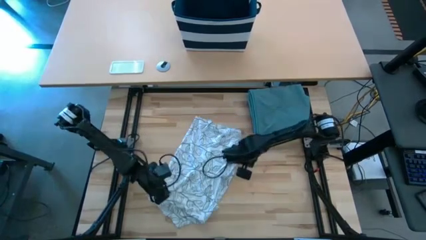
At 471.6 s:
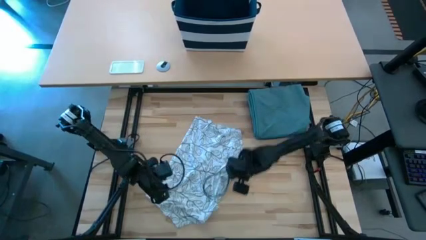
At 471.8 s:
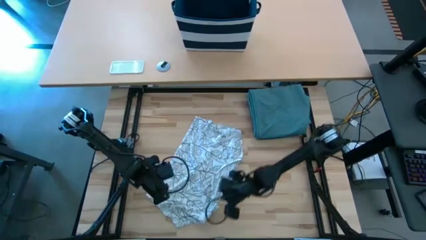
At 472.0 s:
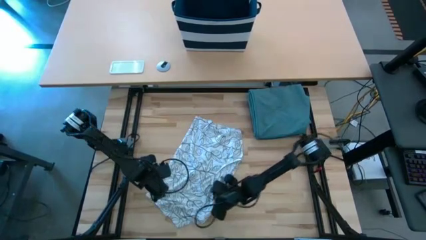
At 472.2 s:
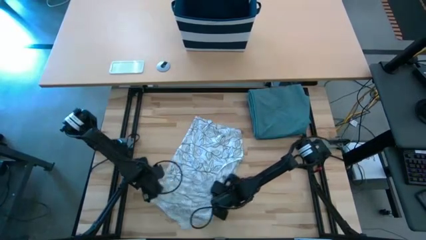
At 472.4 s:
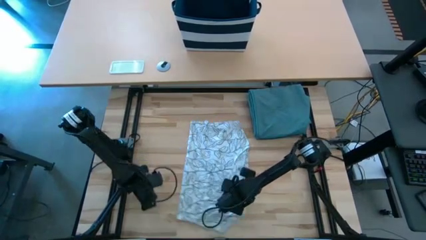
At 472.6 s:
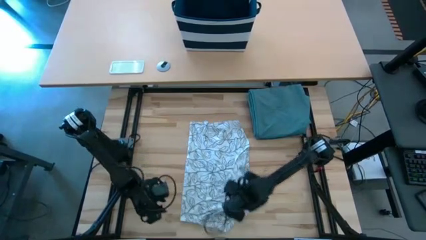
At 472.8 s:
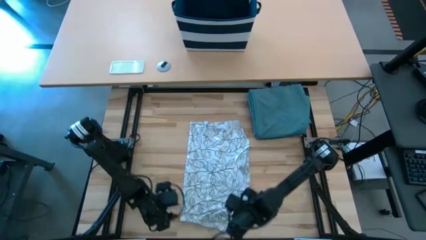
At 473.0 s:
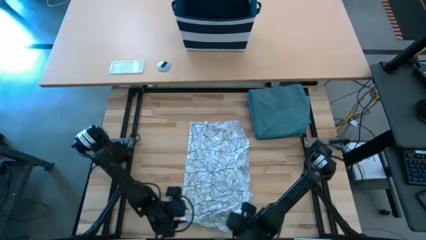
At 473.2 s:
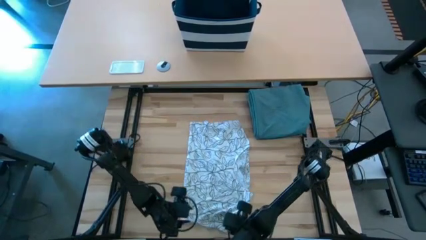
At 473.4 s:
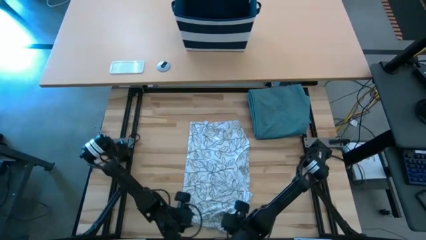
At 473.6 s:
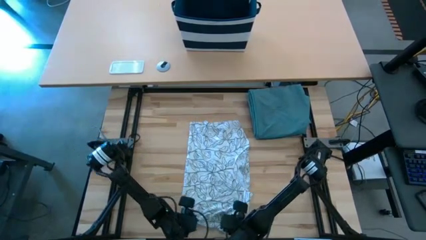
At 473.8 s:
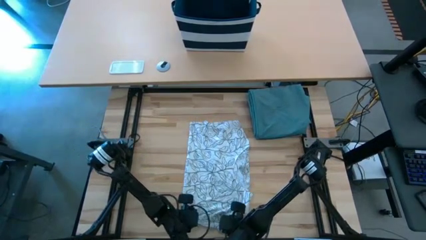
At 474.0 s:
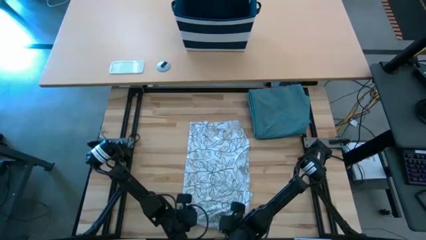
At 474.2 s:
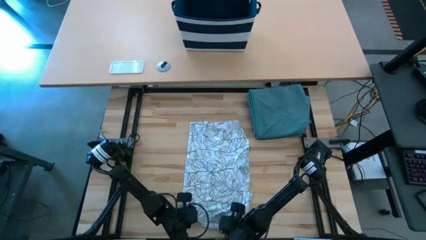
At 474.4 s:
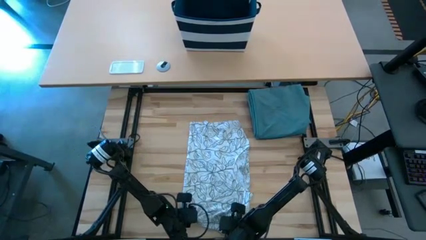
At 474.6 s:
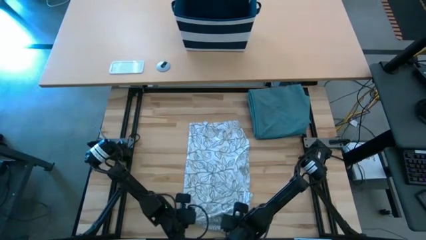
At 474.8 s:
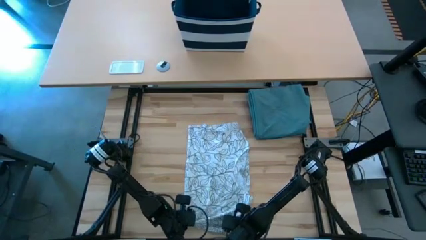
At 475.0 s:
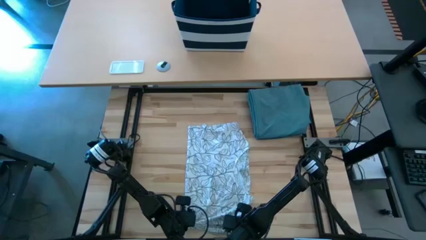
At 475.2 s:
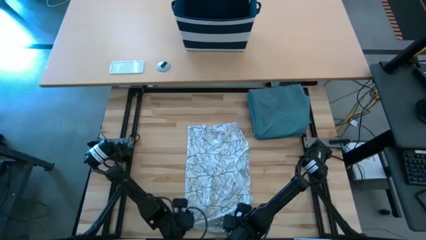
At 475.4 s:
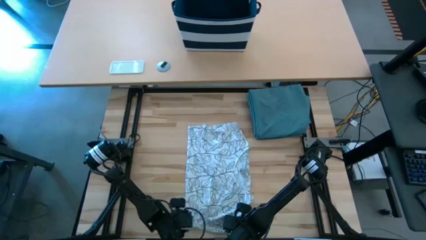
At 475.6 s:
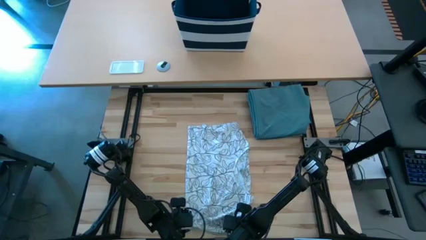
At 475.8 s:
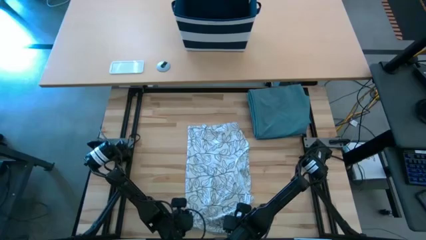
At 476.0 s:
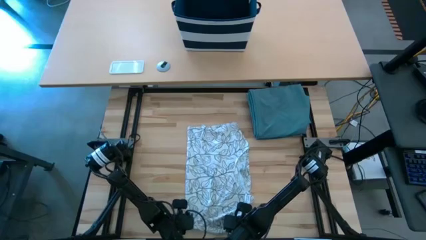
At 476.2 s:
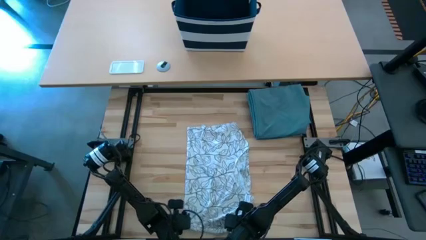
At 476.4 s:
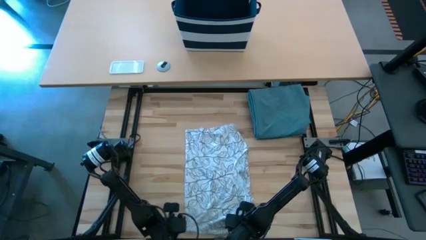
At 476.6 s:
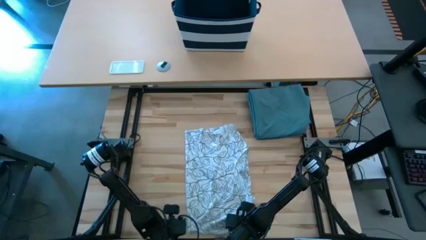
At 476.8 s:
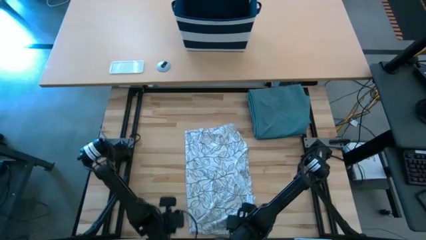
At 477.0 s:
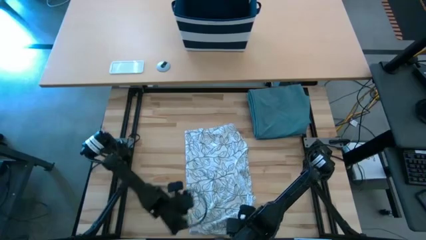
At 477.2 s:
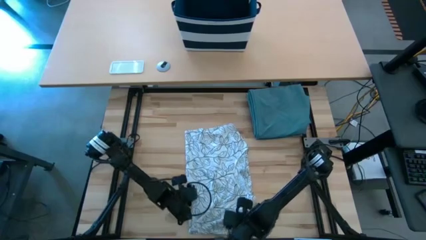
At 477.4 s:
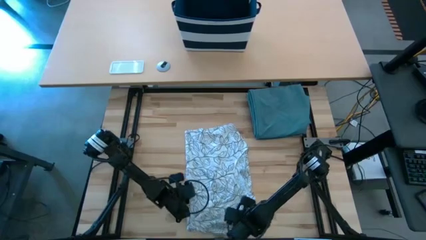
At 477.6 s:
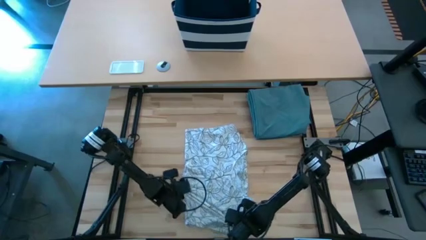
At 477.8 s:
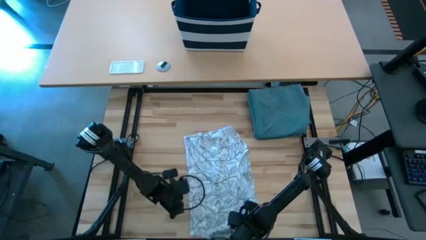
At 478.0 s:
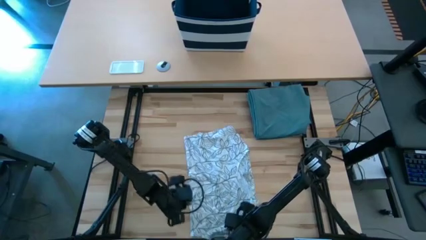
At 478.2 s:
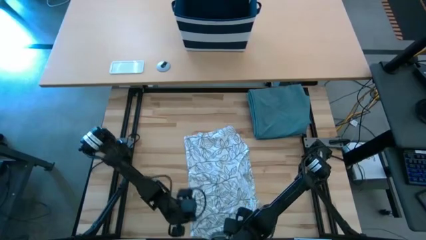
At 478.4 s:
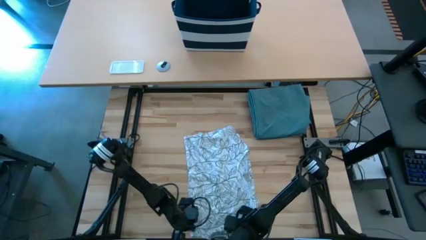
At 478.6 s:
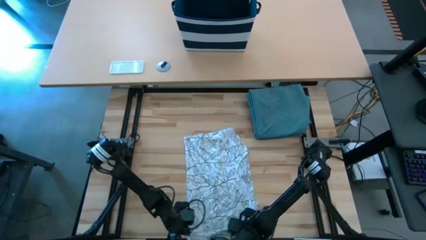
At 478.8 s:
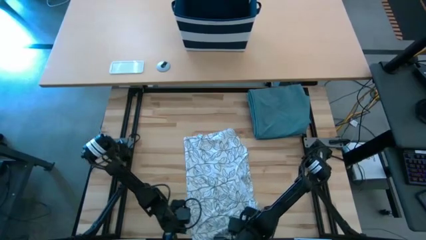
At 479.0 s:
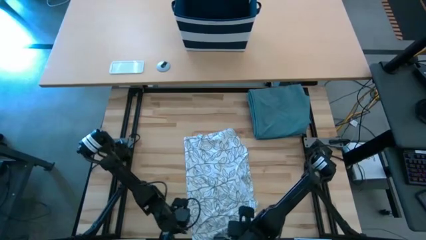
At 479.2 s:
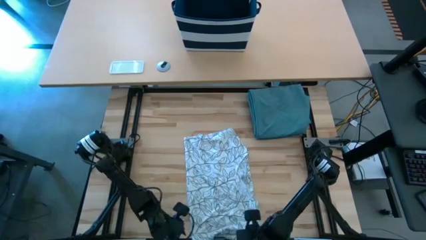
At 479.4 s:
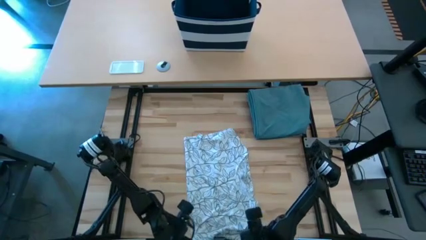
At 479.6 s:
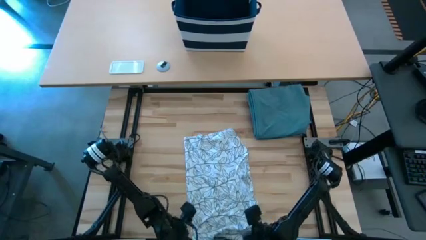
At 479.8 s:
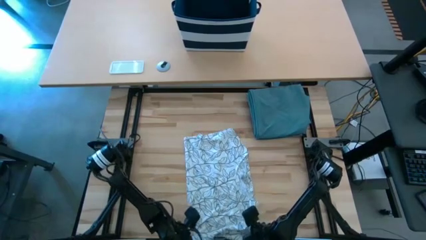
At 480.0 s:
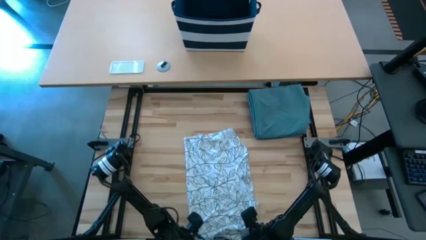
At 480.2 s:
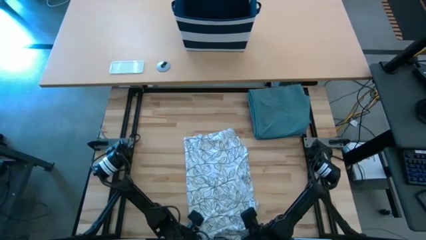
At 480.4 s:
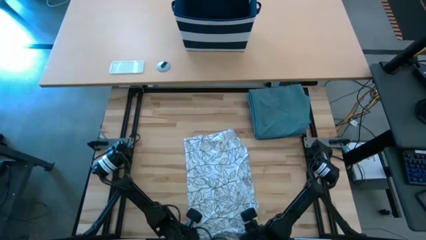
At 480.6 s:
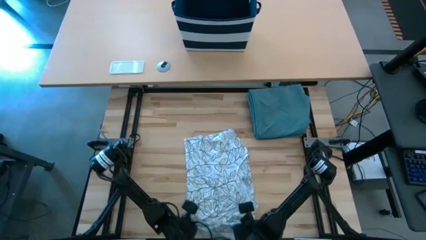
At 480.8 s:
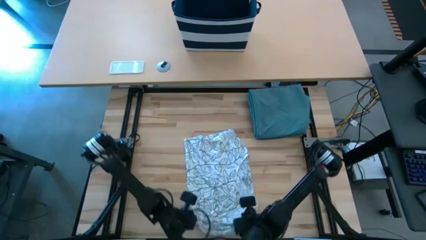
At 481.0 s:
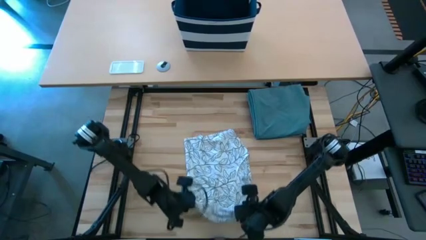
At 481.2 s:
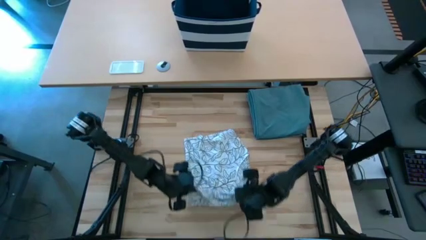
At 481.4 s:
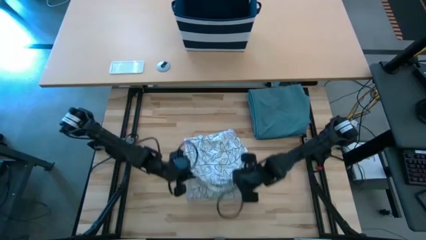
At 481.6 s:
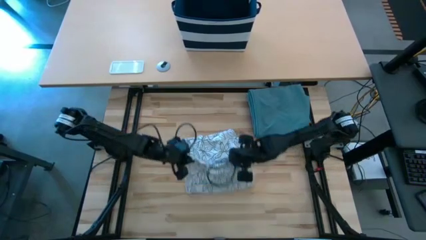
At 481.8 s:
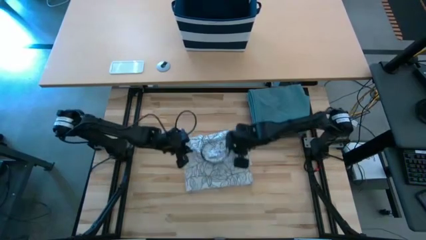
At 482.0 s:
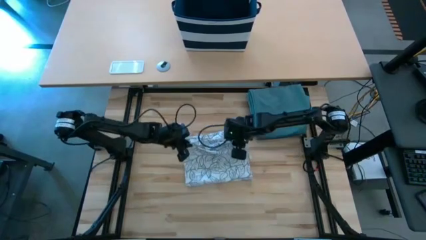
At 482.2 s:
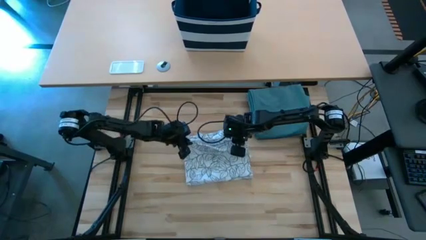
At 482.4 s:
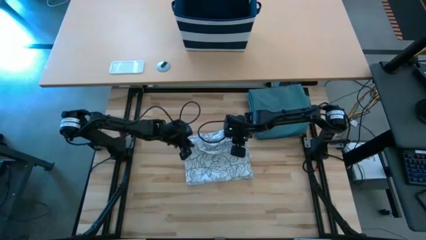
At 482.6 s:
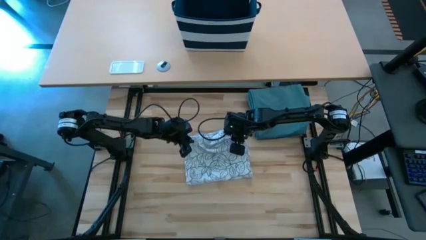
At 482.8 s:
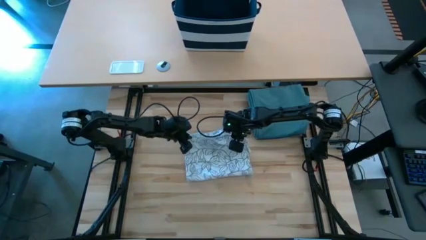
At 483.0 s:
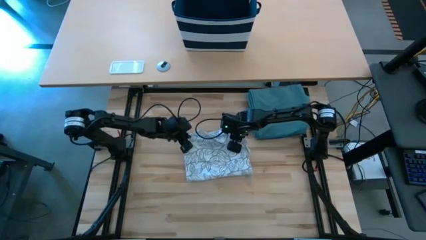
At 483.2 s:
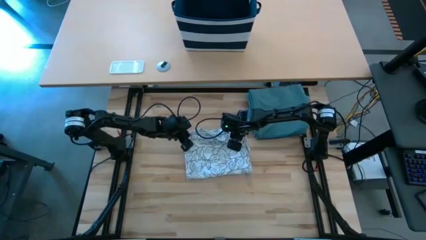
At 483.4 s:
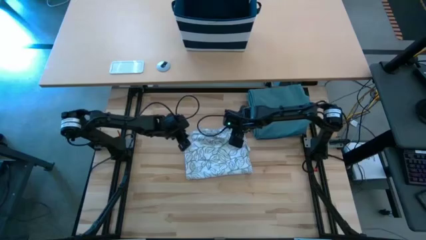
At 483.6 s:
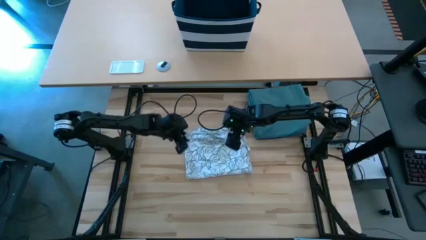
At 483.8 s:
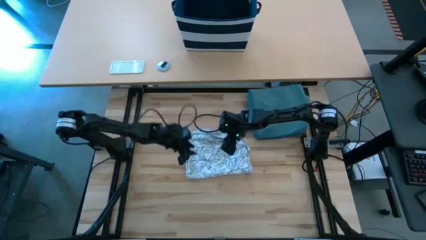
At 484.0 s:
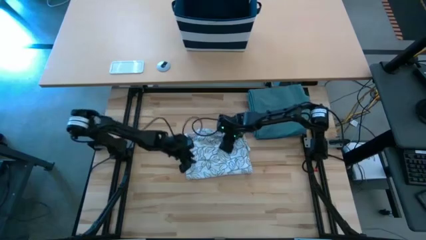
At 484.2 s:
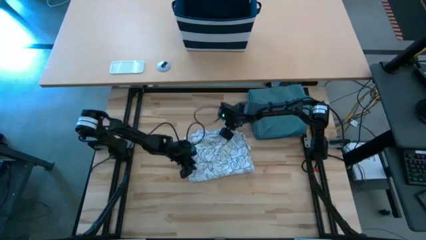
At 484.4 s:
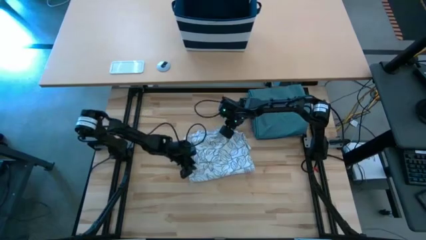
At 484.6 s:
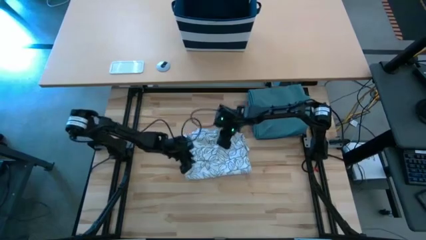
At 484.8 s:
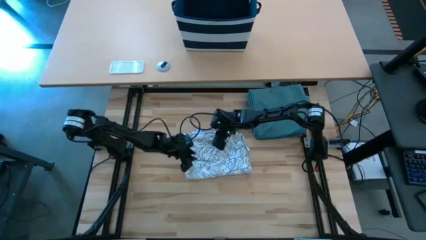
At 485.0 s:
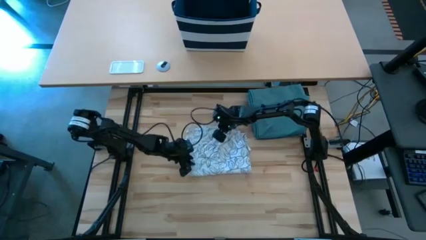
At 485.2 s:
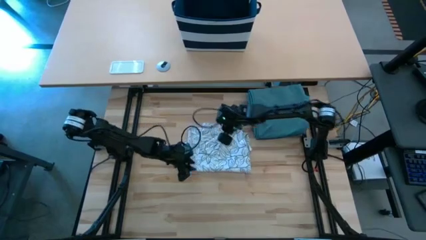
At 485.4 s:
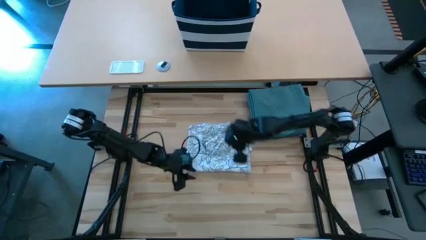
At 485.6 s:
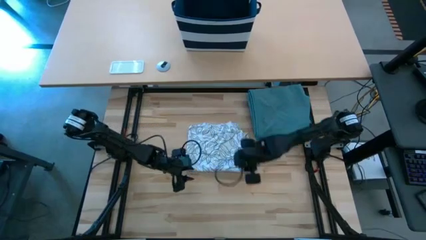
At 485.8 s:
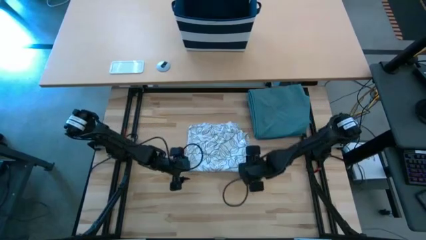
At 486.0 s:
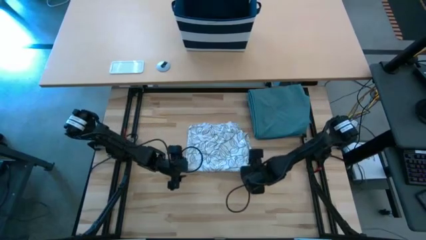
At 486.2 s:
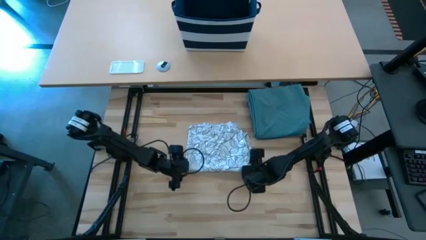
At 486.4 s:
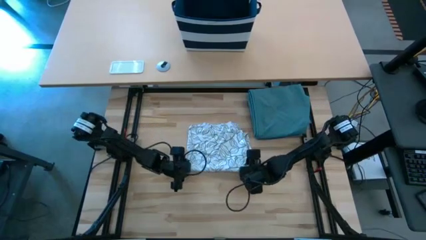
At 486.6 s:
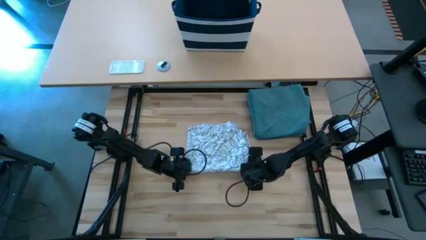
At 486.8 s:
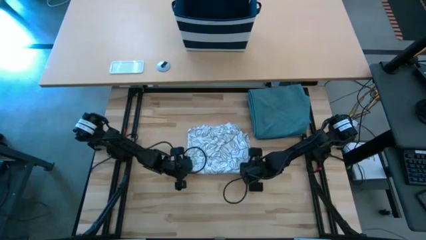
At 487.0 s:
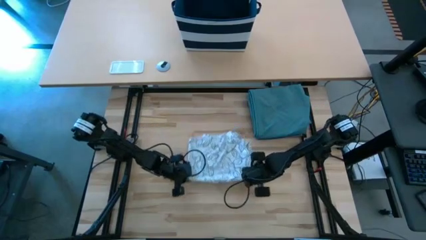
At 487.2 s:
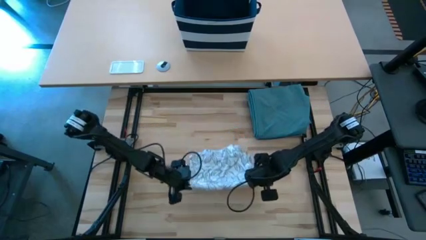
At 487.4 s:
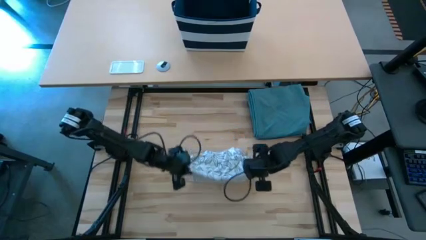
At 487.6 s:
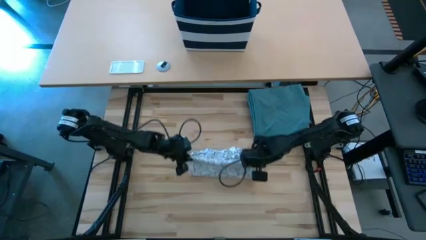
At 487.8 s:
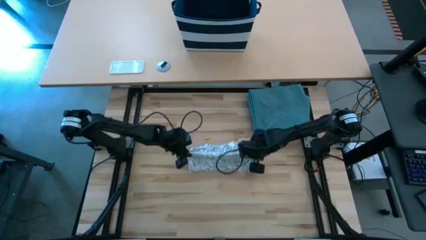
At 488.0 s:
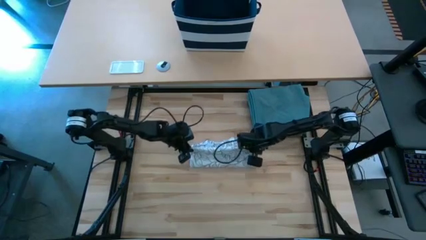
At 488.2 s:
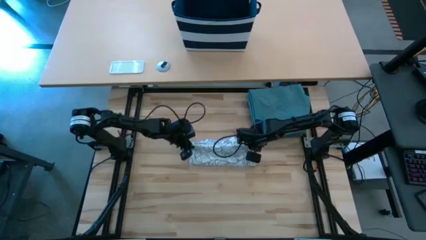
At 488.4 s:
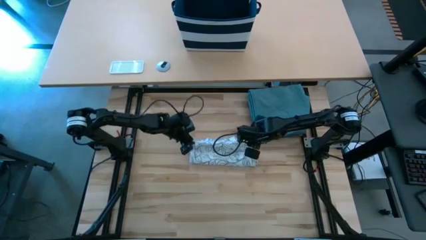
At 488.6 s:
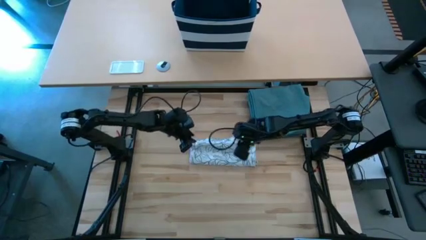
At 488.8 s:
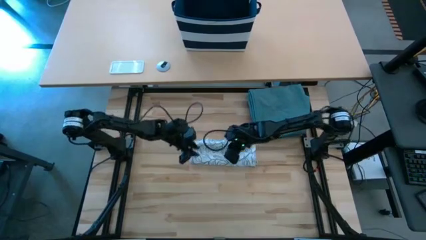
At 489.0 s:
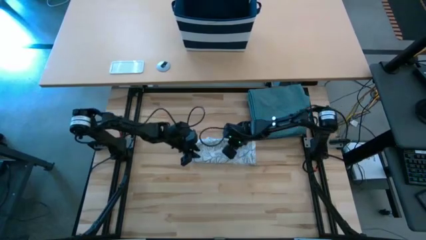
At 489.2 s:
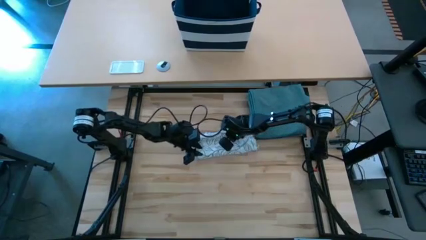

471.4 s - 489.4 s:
Task: Fold Laundry from Bin
Fold the white shirt
